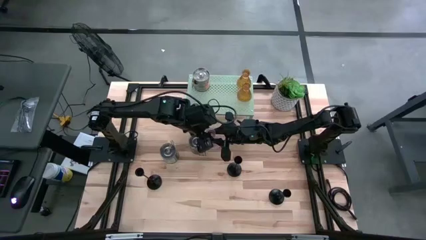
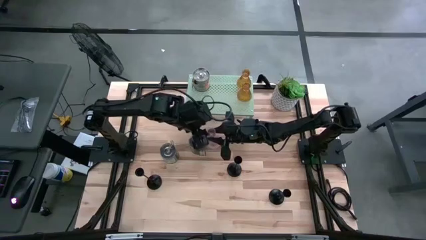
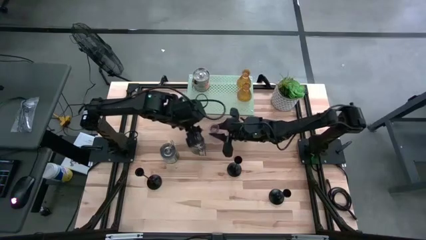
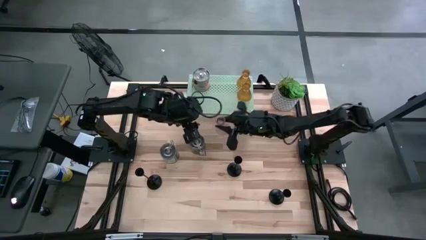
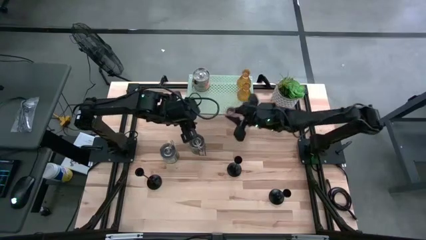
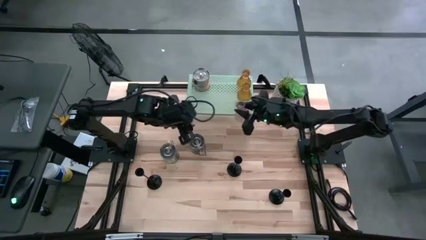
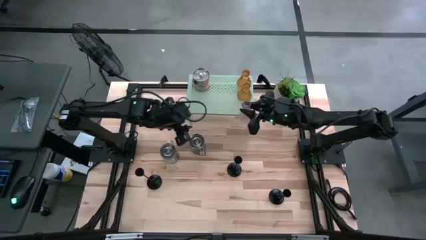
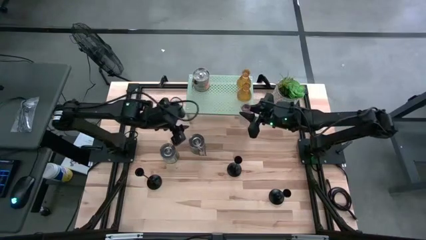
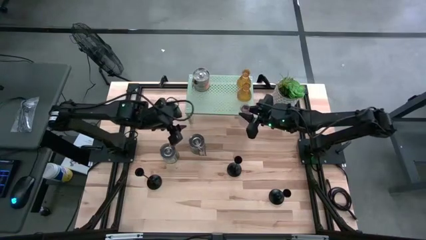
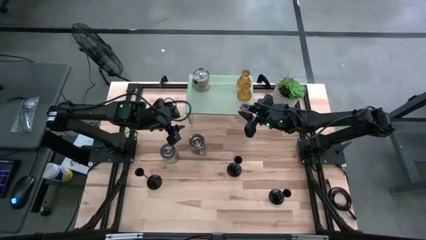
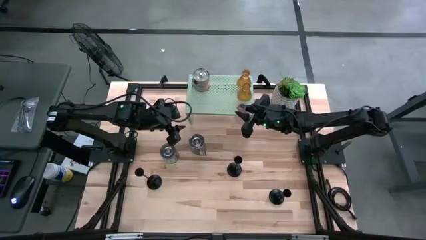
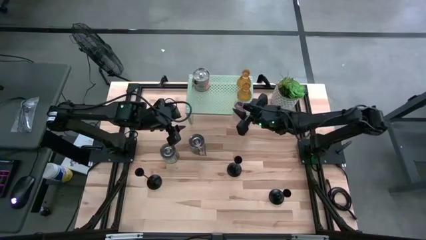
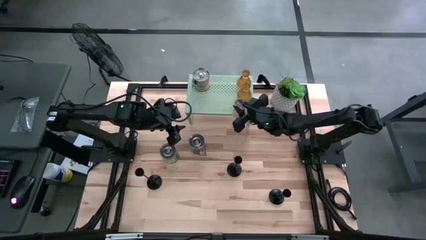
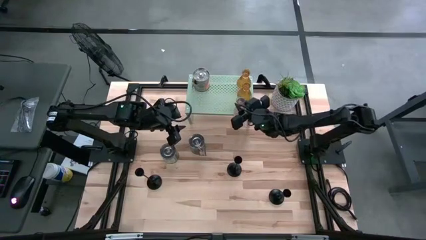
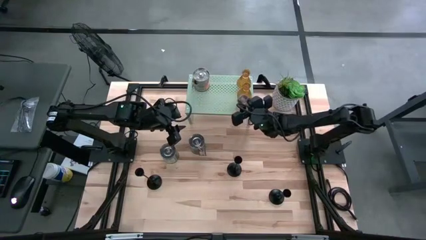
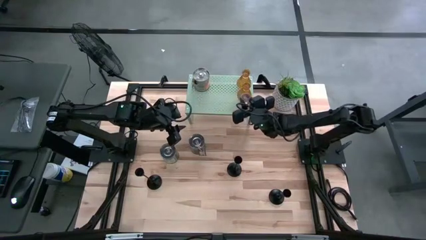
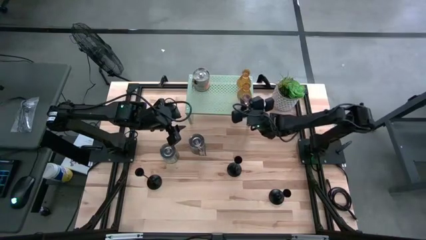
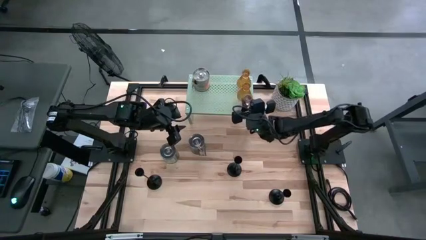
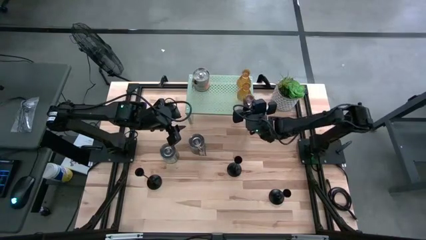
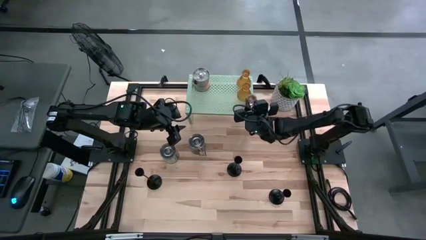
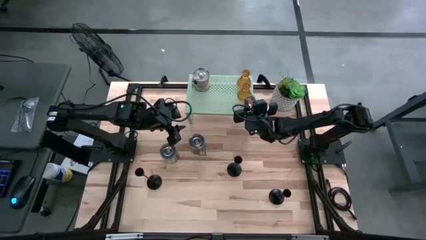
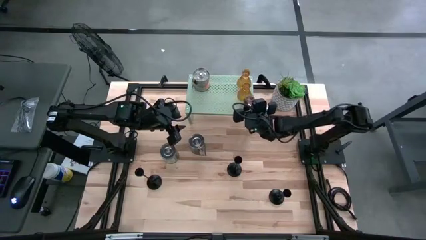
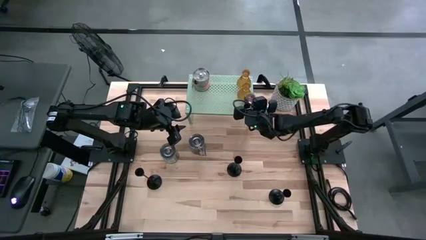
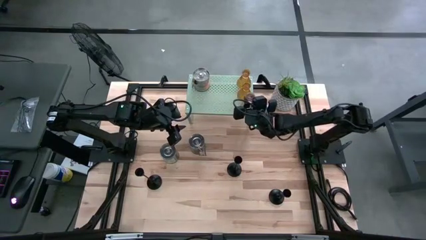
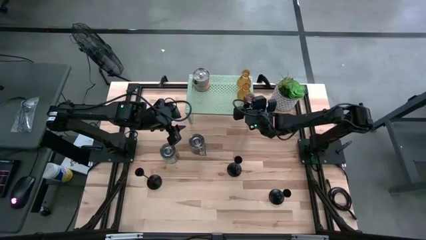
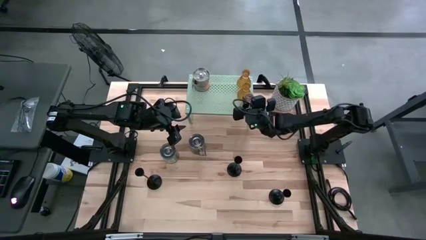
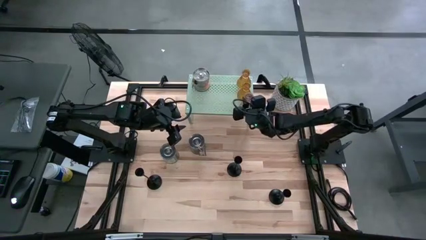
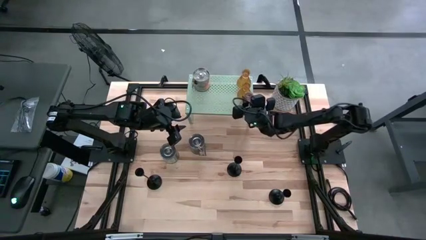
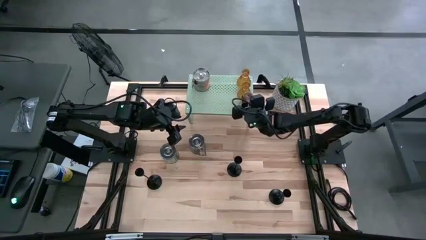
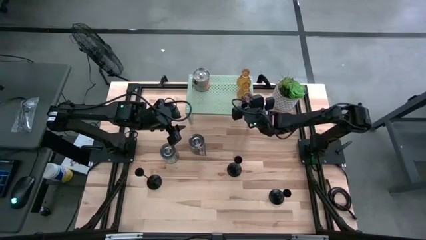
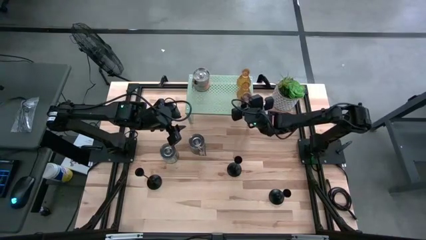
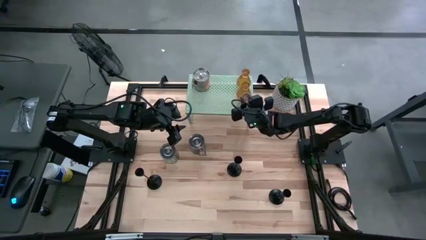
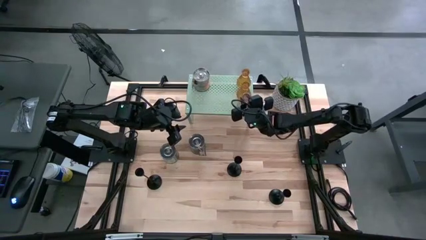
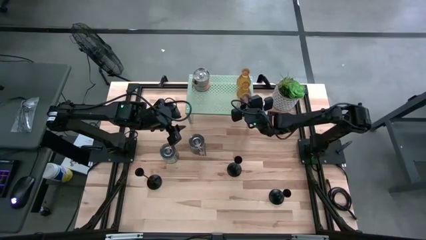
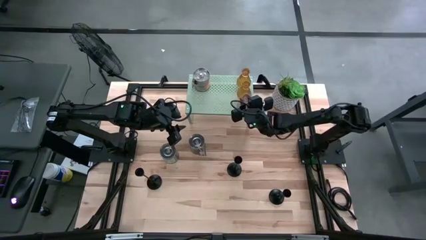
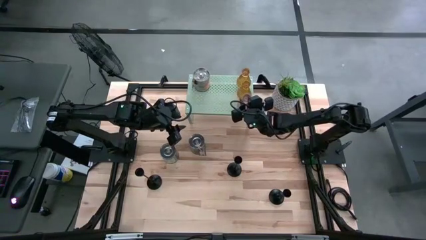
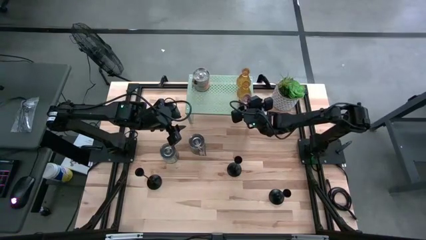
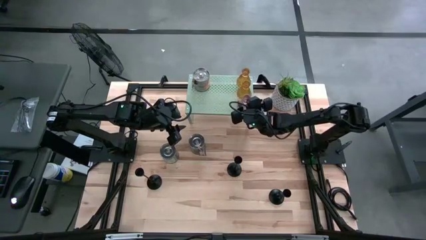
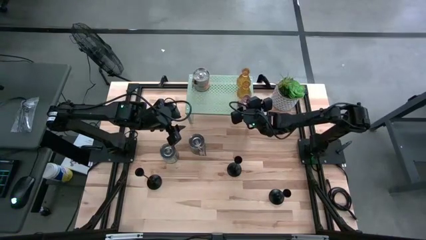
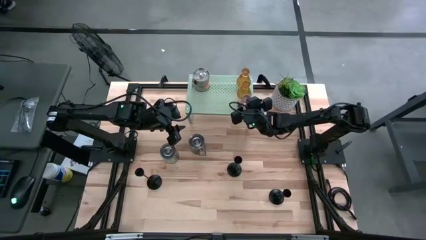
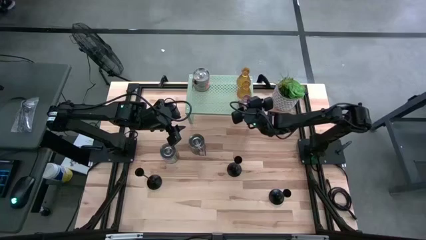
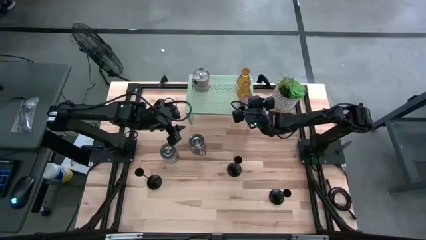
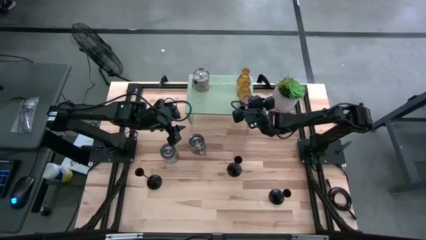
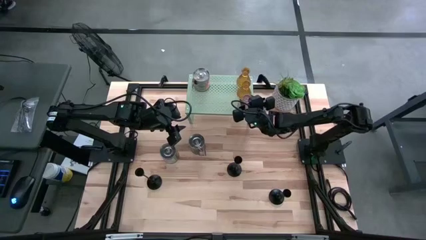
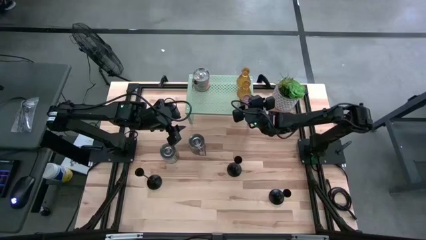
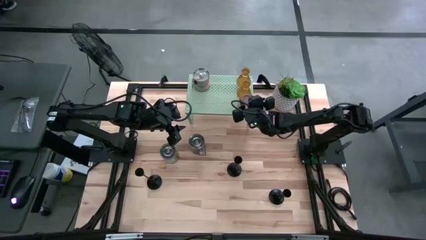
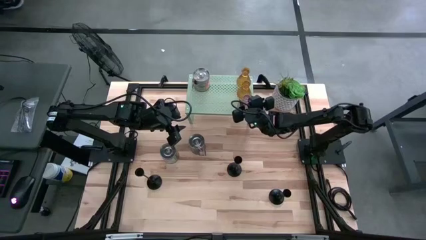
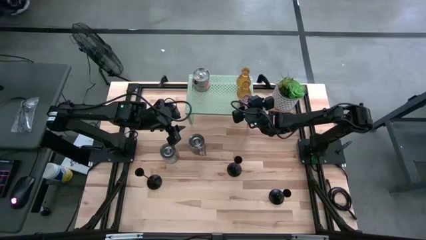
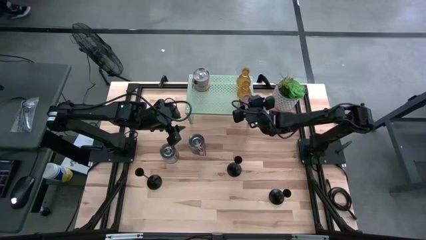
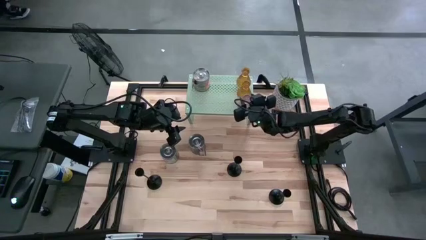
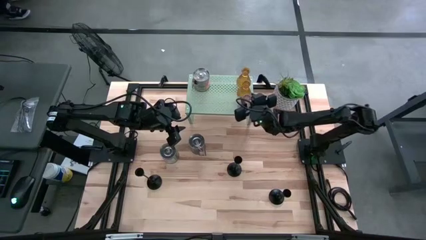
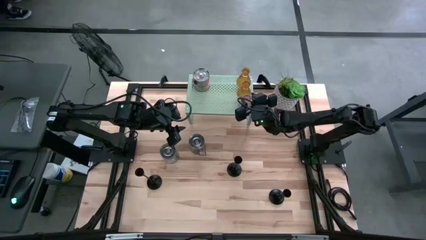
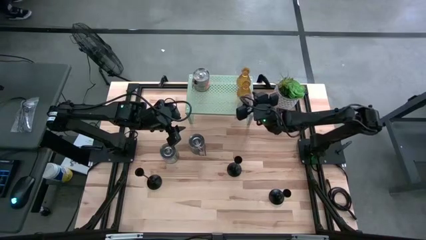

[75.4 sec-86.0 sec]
Task: Pick & Place candle stick holders
Put the violet candle holder on the shelf
